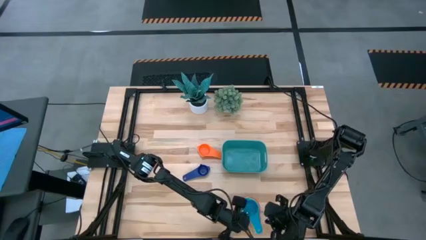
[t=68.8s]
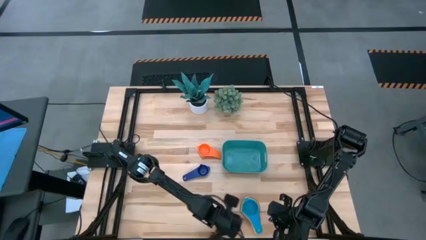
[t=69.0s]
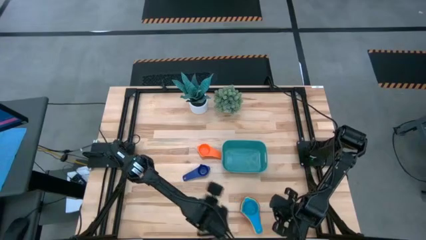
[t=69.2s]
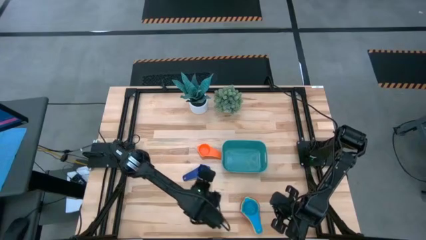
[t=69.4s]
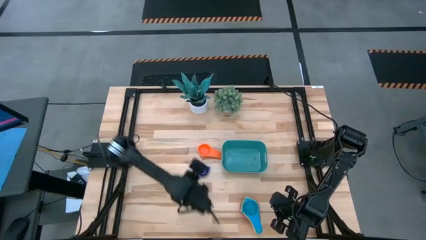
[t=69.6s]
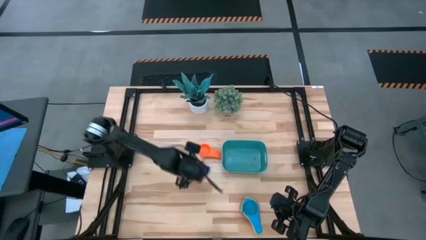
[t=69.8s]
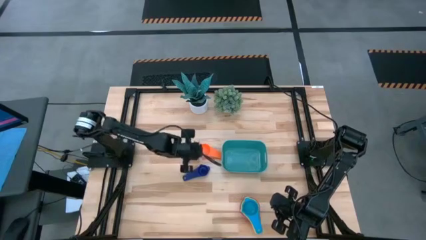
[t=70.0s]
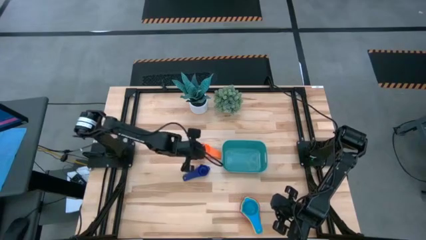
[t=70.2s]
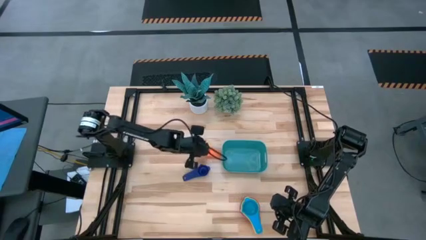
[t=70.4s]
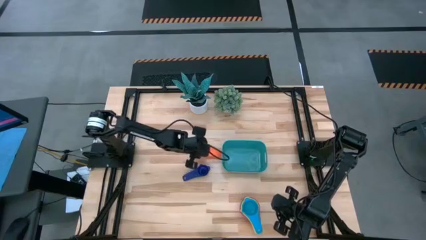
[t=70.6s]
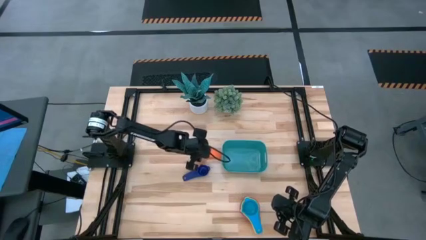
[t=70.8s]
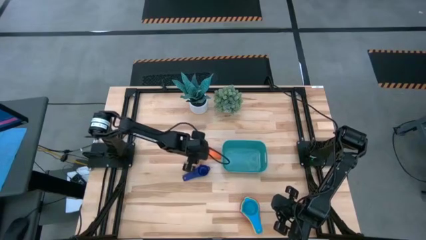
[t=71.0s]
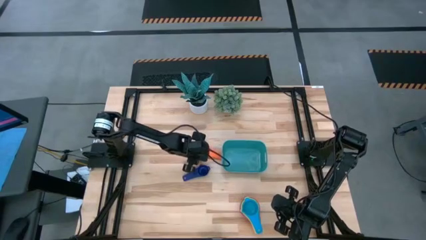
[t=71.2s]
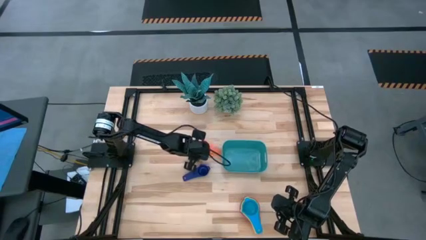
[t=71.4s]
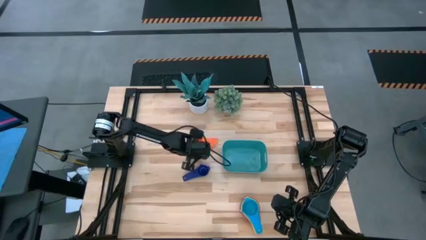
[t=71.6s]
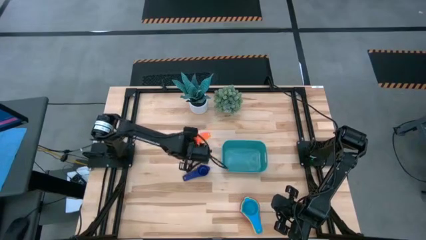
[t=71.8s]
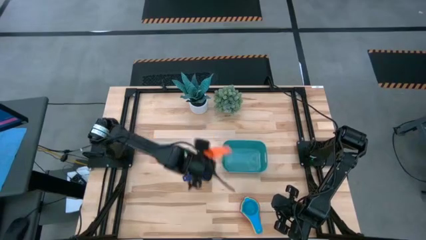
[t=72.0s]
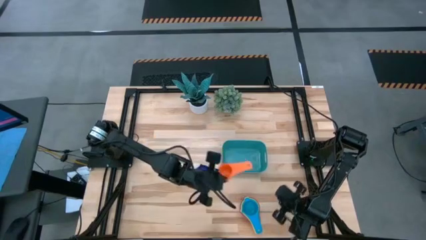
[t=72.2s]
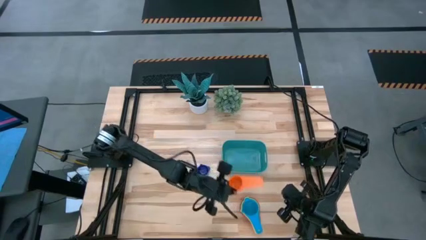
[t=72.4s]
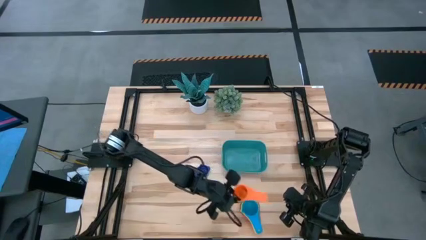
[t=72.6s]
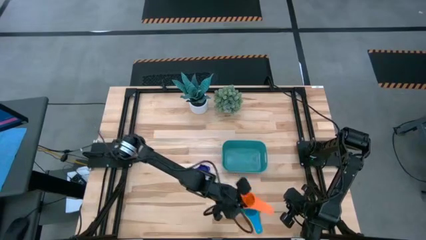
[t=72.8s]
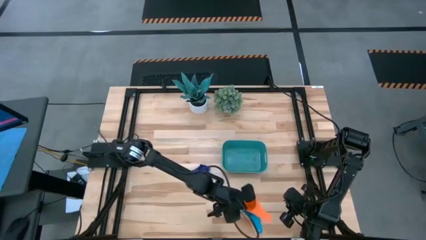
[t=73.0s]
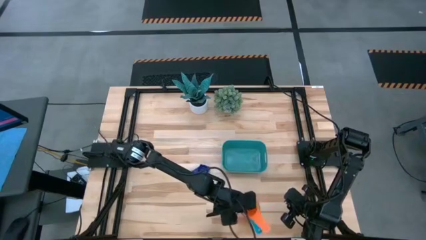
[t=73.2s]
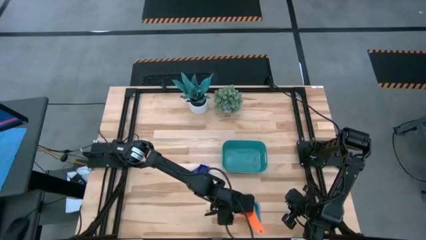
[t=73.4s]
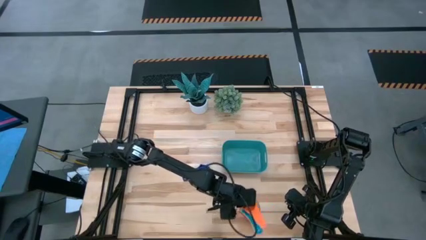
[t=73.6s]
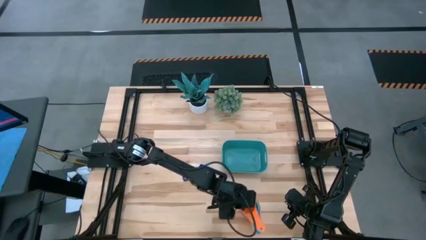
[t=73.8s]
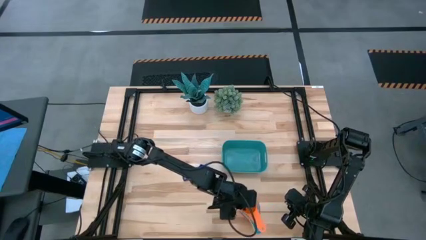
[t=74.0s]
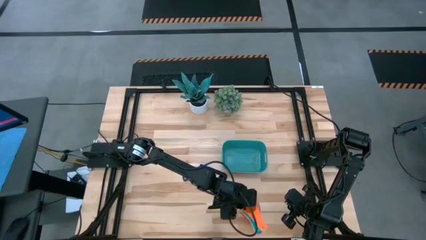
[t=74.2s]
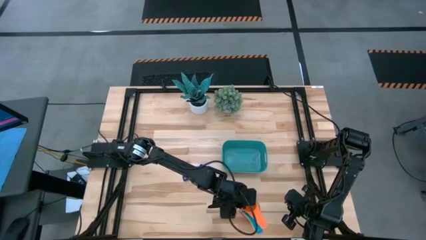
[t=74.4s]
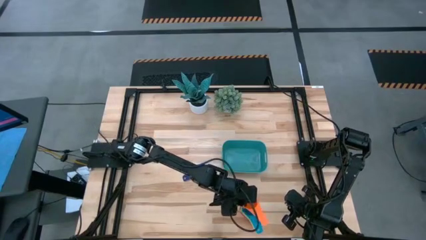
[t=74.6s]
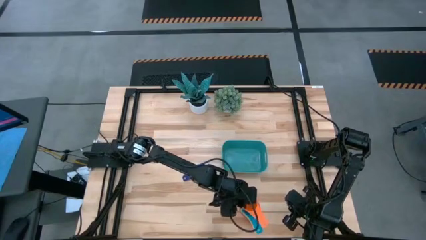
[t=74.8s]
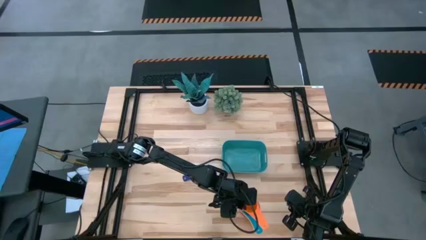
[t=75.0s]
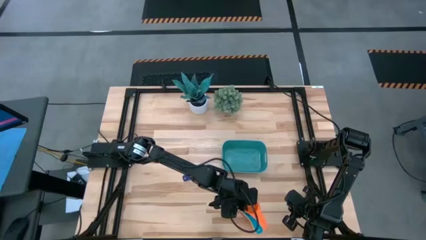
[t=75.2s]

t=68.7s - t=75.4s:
Task: Nest measuring cups in basket
Stack the orange measuring cup on top of the light blue measuring cup

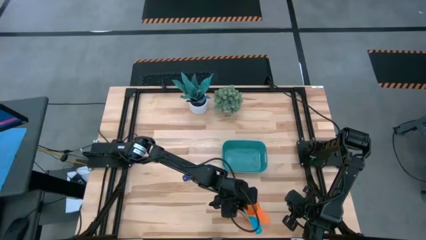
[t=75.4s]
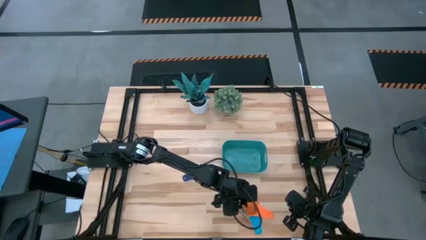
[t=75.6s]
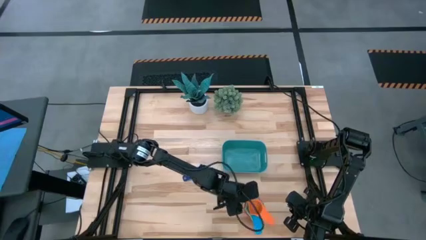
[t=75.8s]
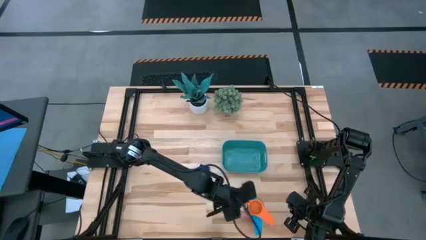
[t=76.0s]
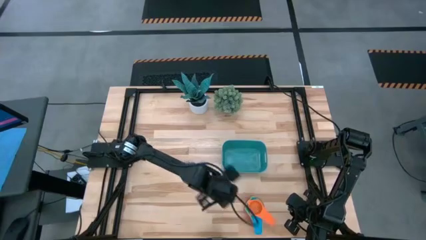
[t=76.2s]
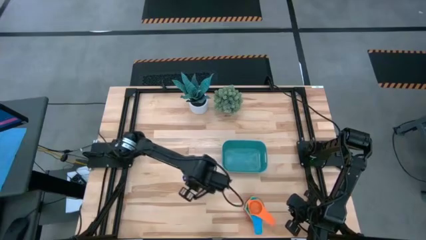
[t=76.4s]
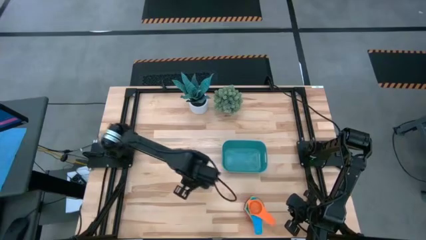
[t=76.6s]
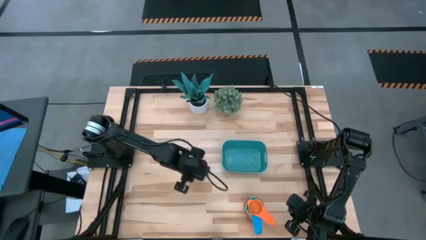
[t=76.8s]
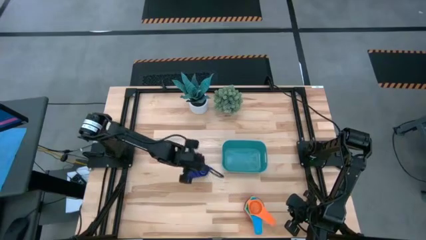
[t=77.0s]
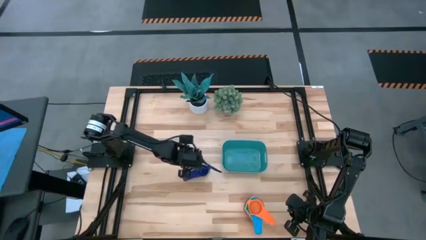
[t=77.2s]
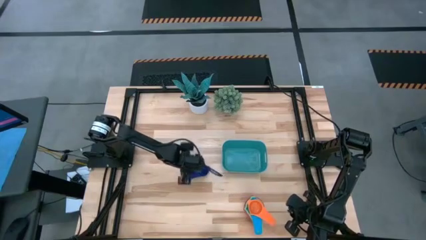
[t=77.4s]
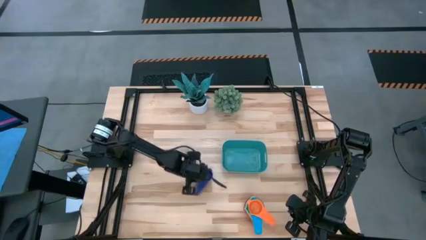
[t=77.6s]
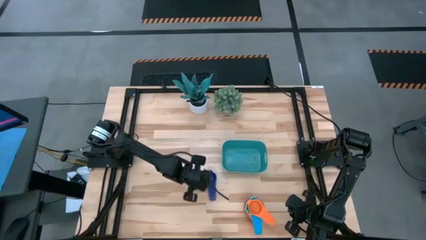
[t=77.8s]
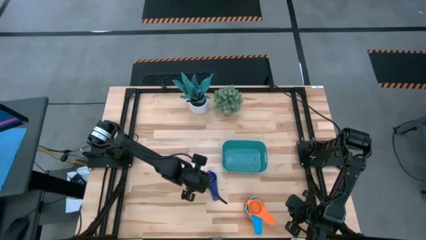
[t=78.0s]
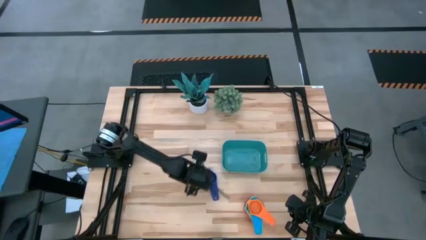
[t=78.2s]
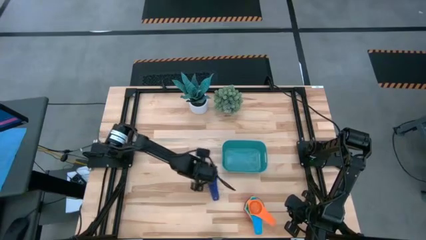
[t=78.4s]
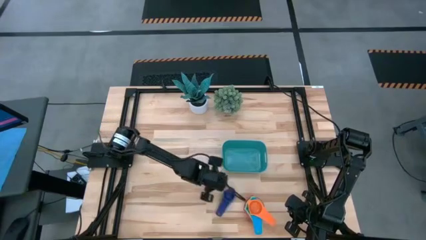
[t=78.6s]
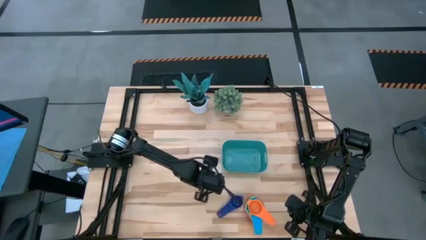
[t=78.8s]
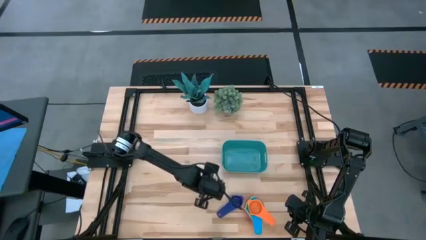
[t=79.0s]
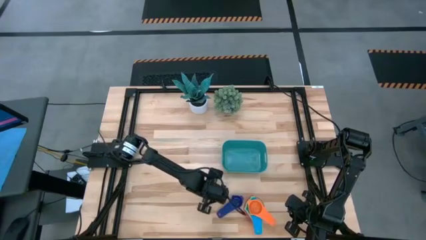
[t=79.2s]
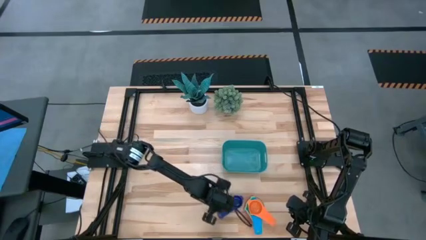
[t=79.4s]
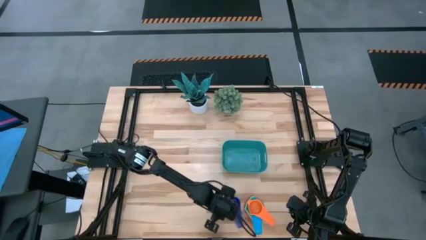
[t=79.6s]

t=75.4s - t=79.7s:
Move the violet measuring cup to the bottom of the table

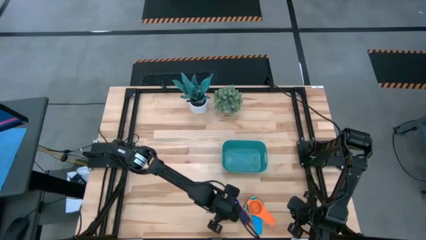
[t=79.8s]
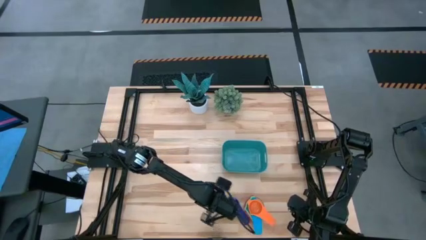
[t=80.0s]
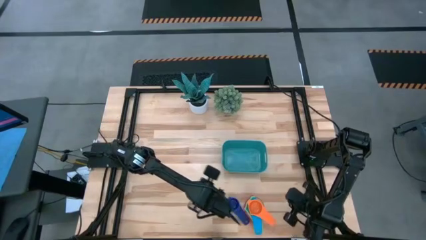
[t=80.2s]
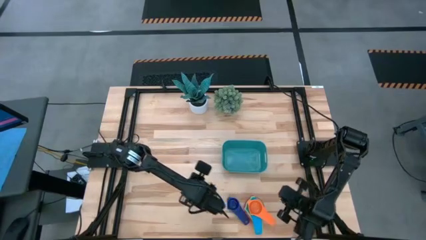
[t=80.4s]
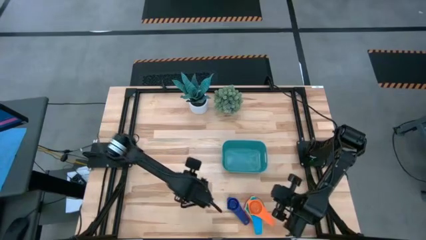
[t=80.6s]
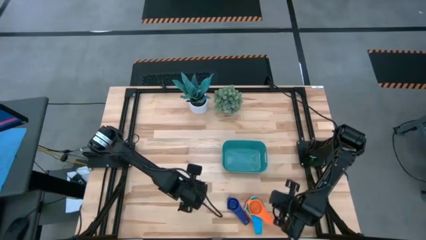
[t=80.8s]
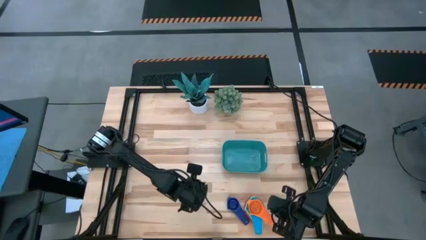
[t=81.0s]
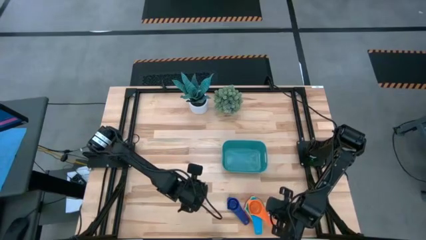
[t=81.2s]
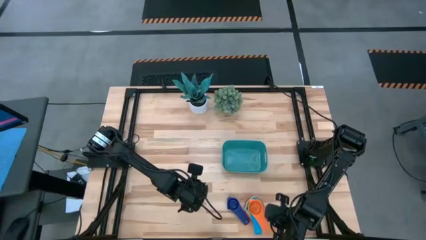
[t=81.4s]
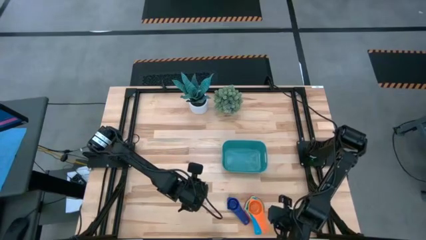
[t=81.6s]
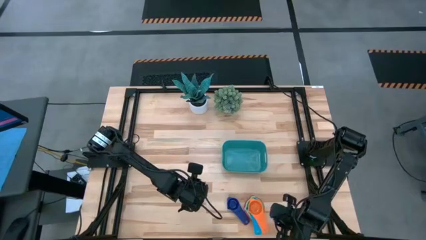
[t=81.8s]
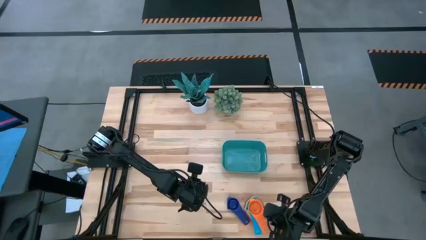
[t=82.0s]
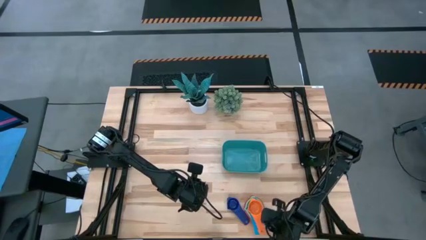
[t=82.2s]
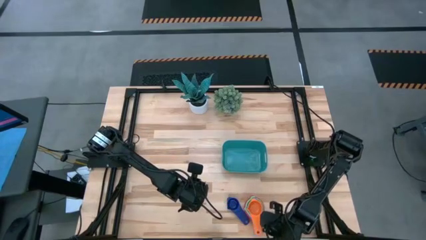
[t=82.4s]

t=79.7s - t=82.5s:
Adjust the orange measuring cup
